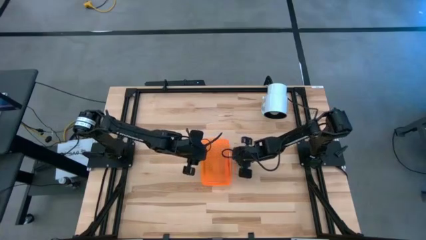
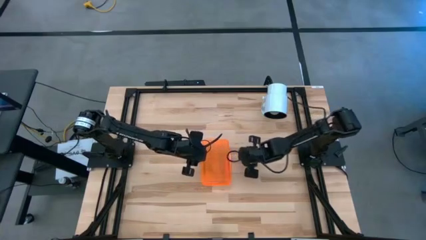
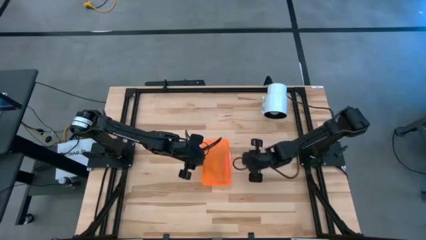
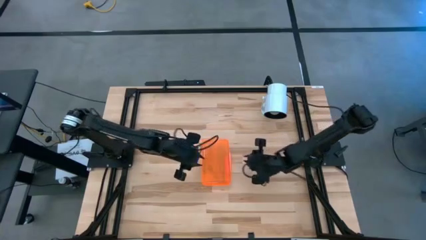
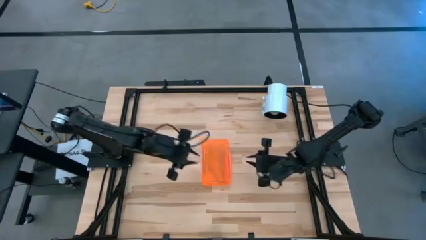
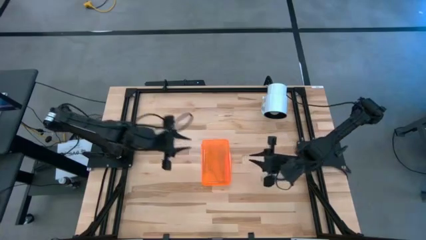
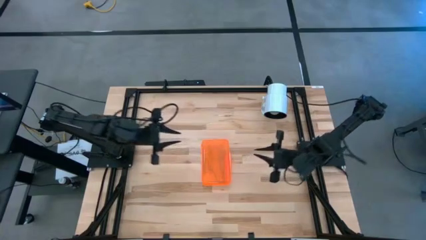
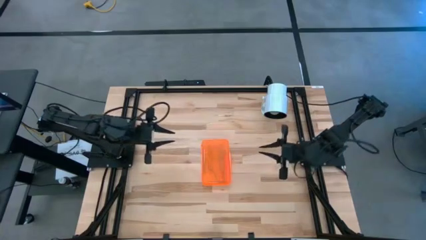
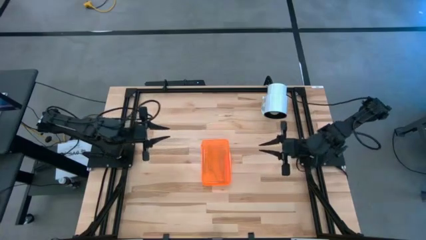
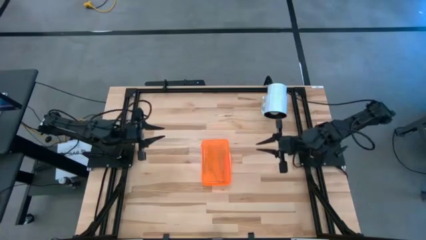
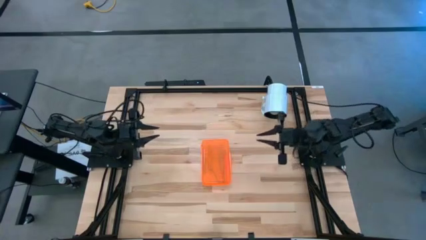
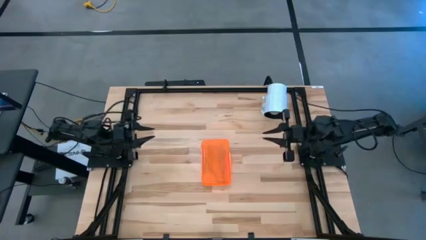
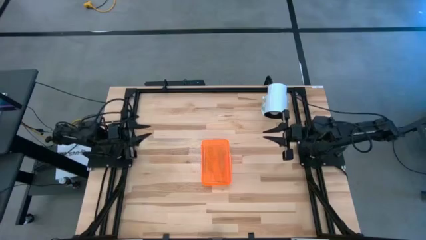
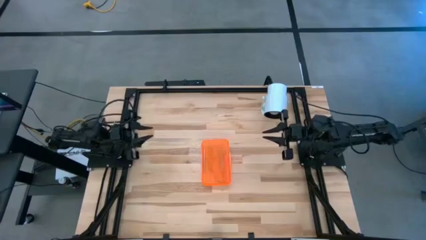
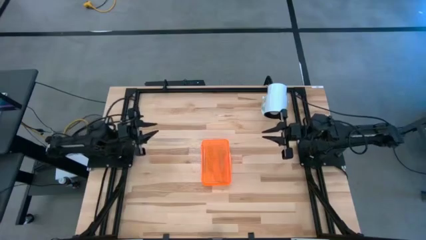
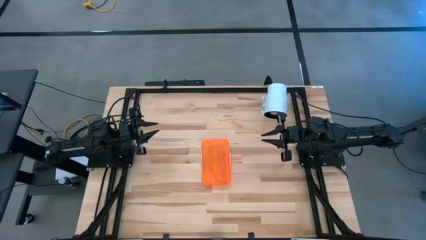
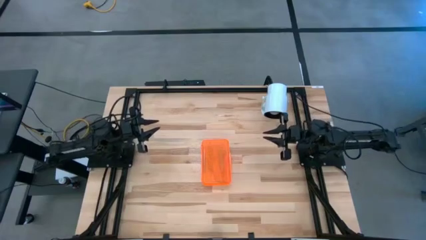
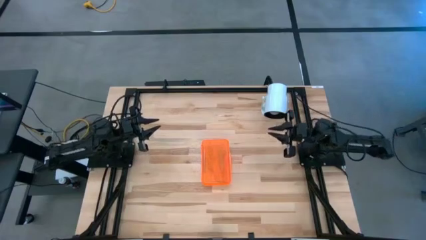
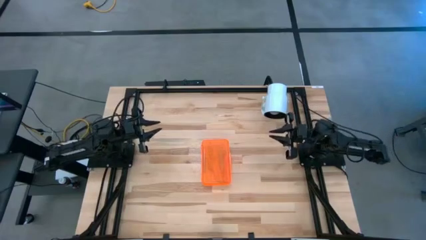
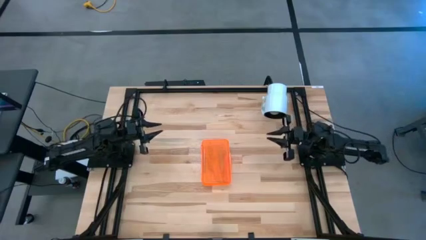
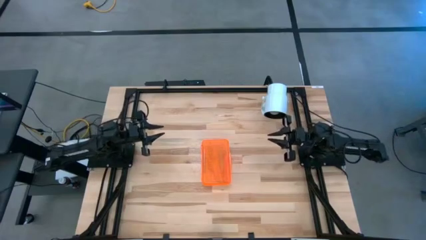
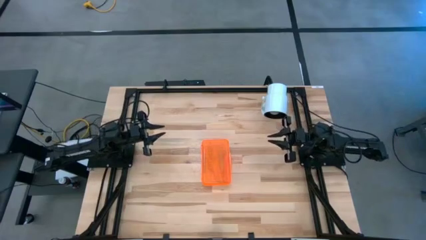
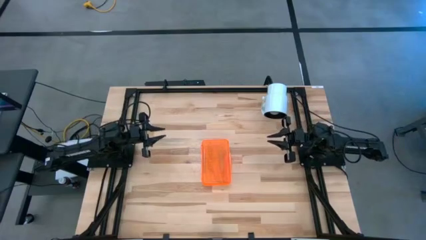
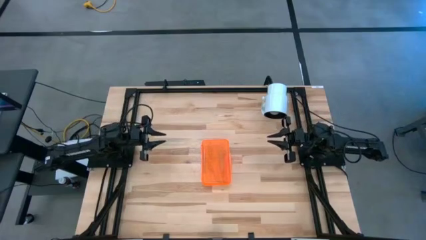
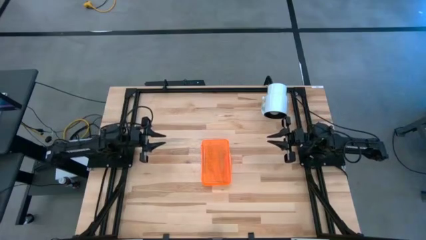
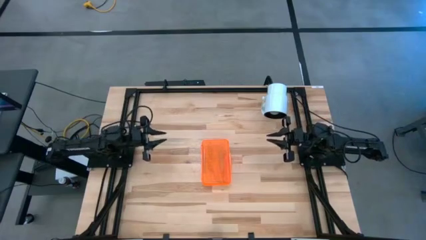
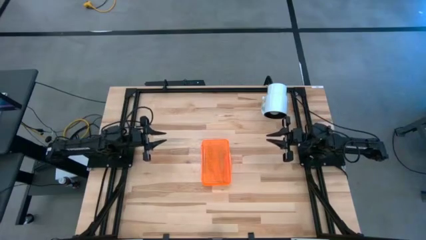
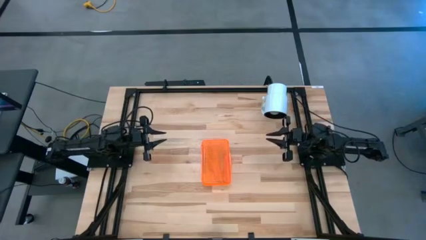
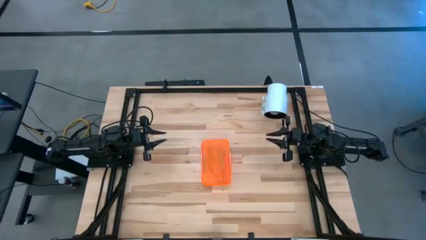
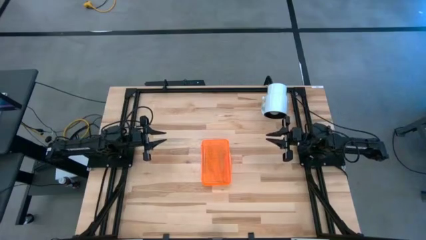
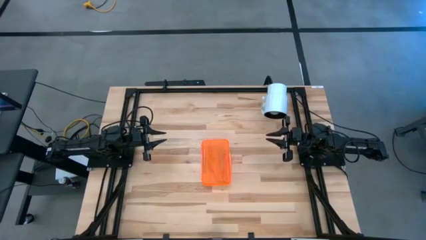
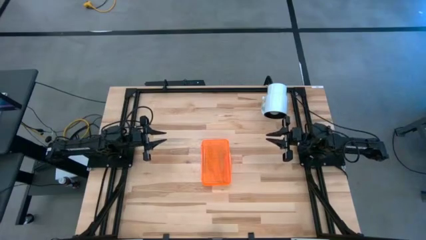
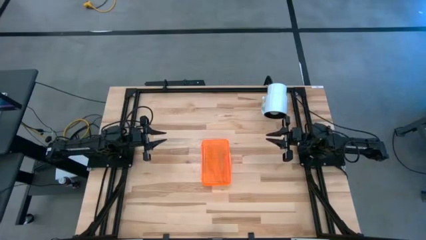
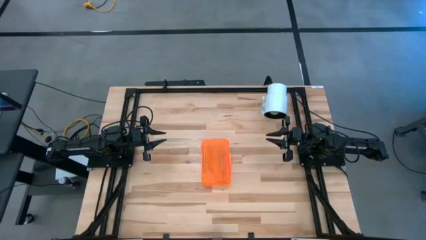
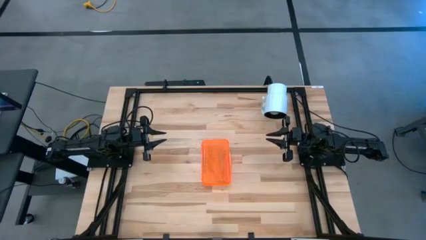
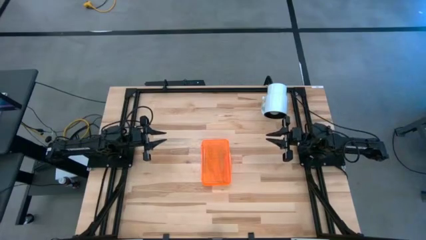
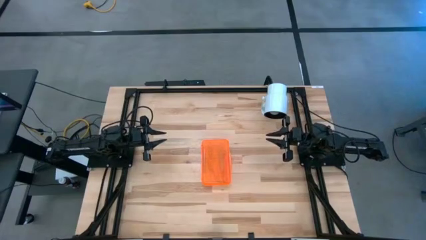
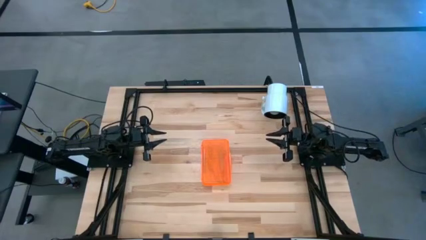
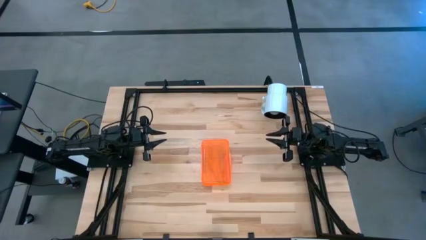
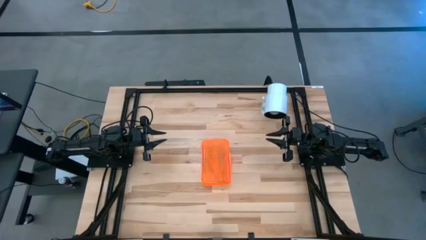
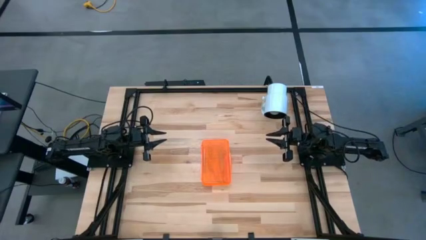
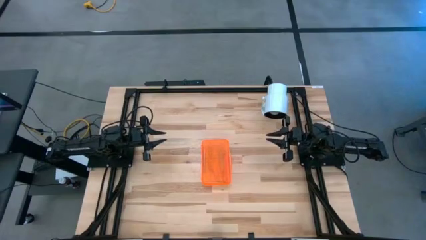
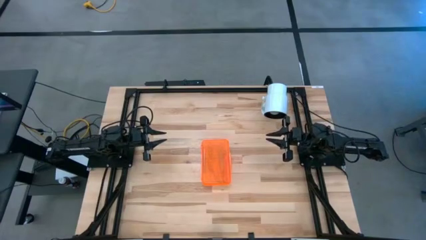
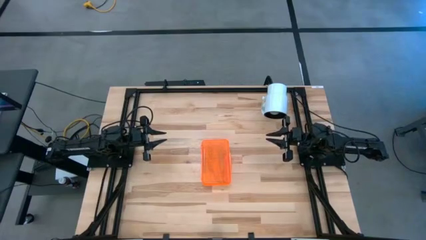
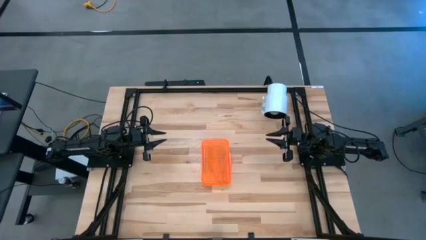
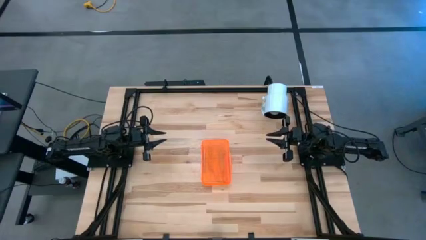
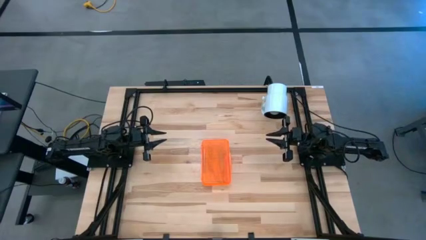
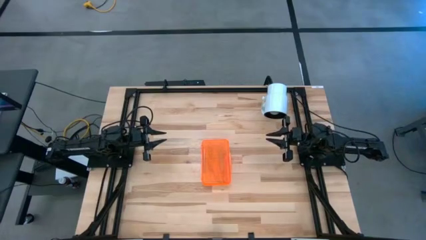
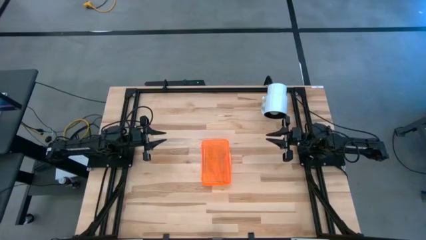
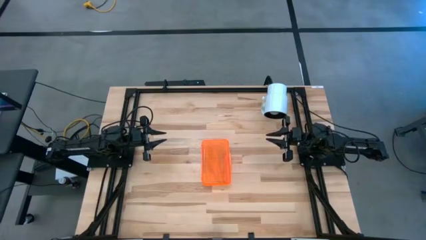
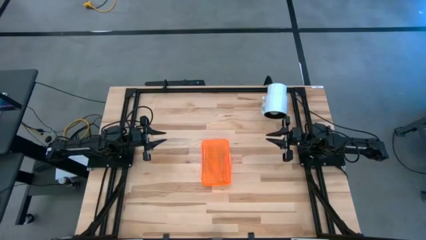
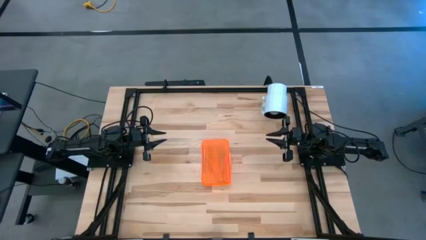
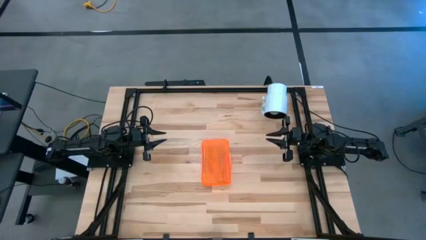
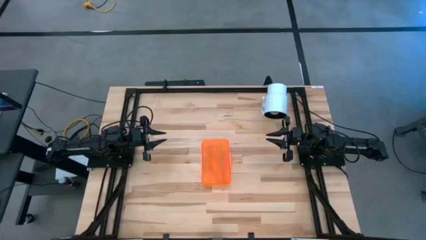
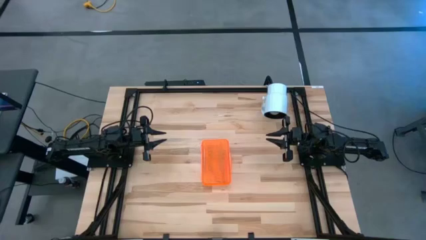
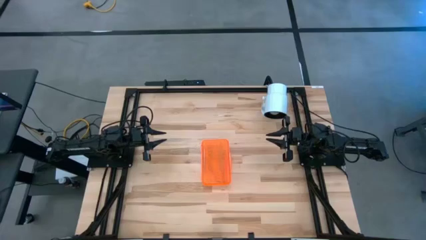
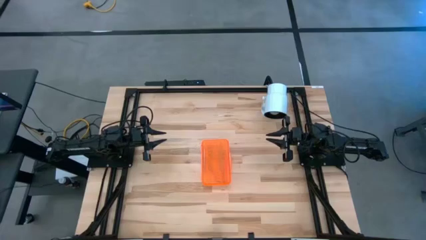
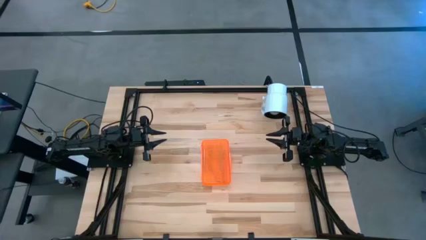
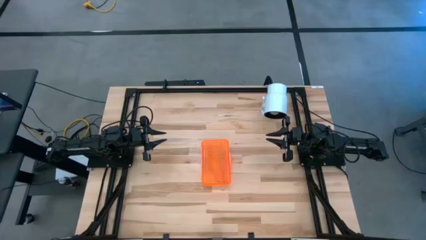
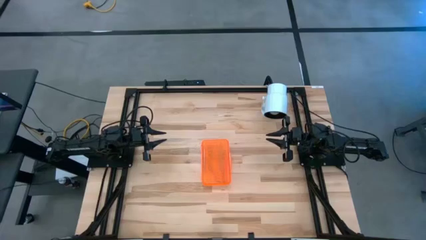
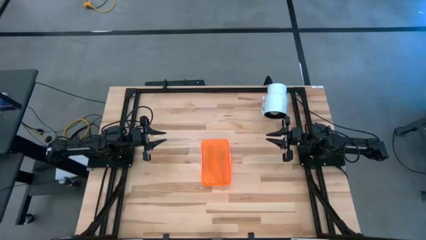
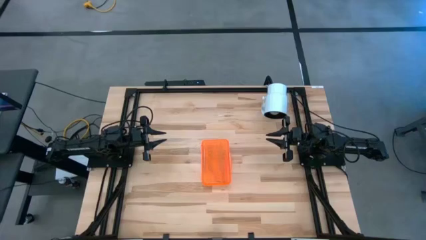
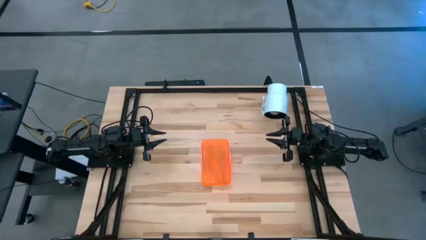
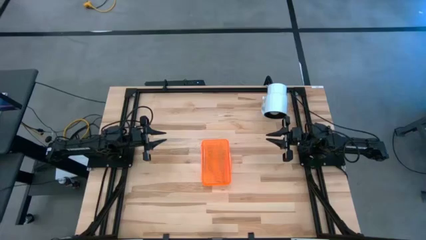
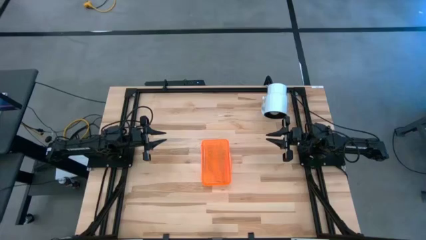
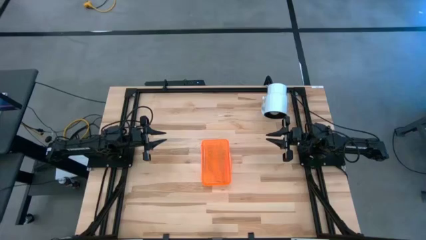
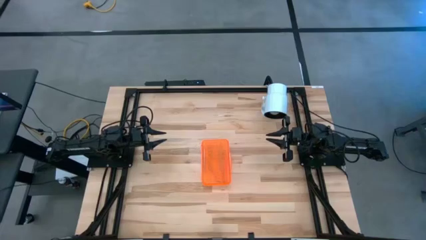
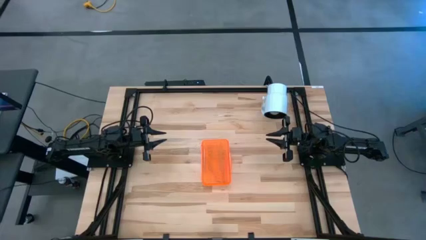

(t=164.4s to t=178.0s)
Task: Pick & place school supplies into a supply box
Return to Home Position

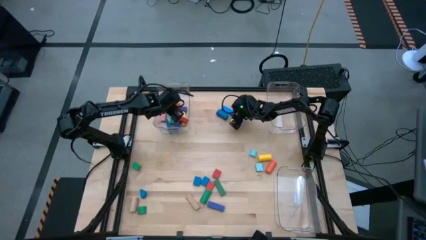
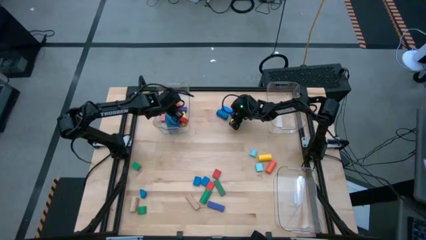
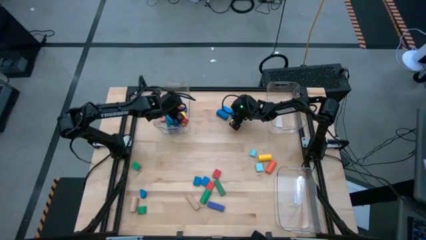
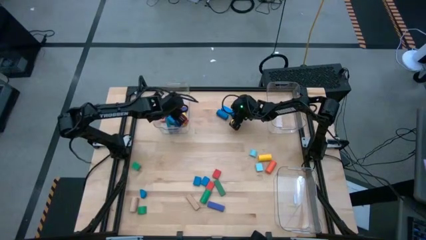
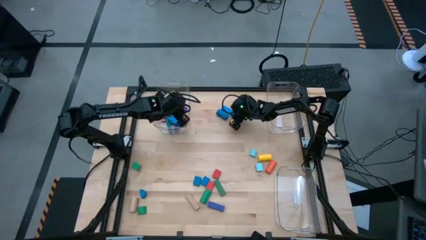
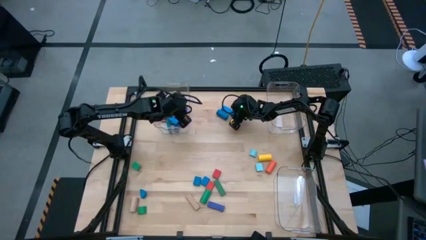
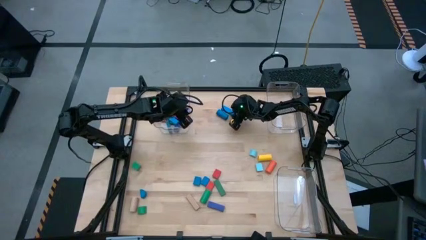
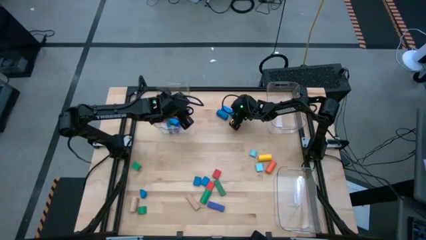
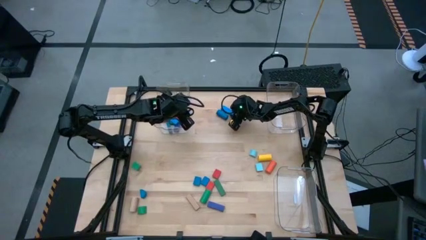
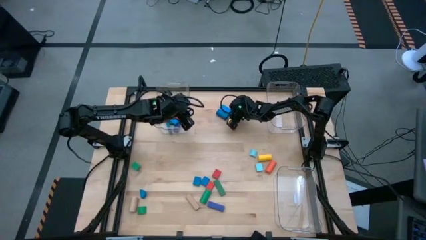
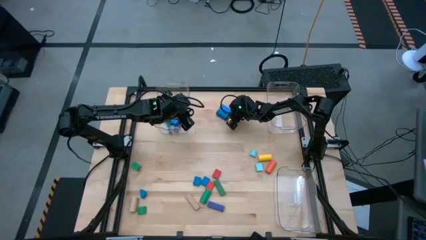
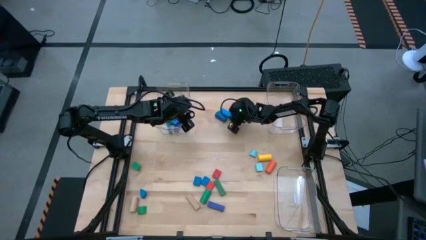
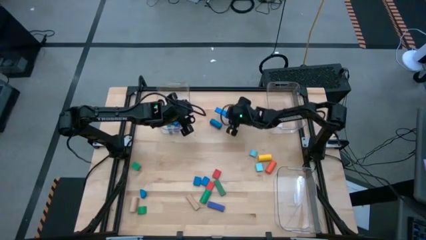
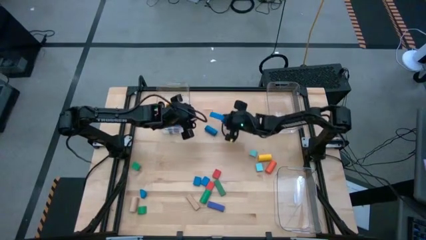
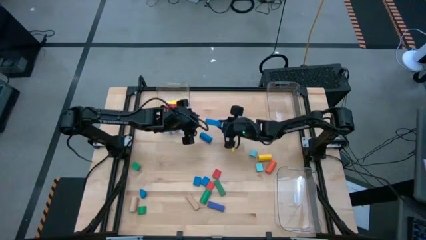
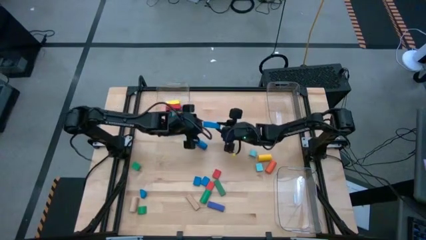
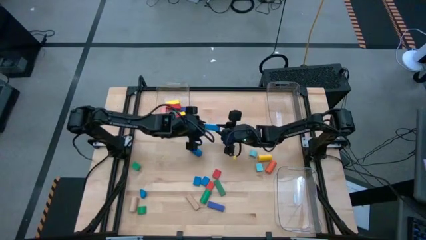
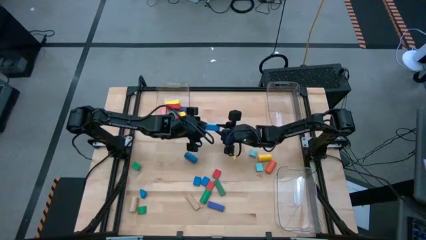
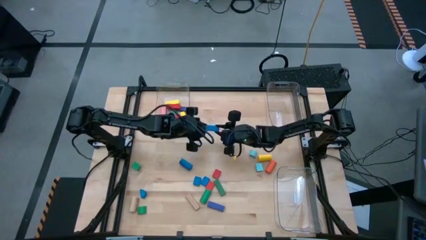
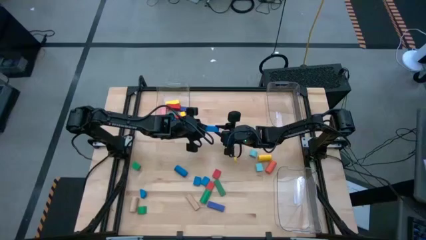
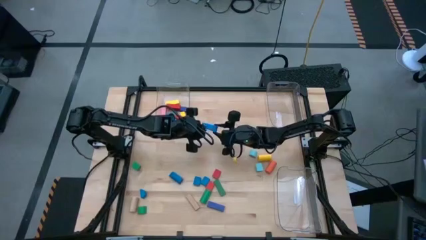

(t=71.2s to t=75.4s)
Task: Sort blocks by size
Put the blue rectangle block into the top left transparent bin
